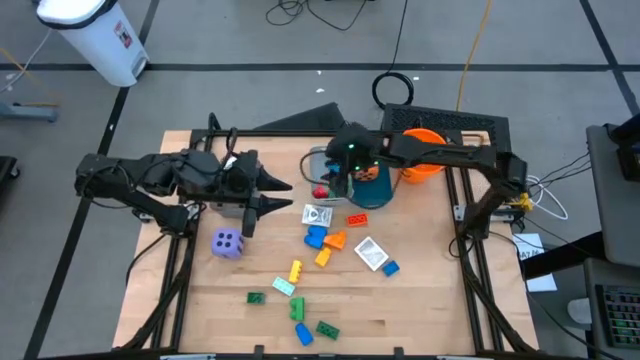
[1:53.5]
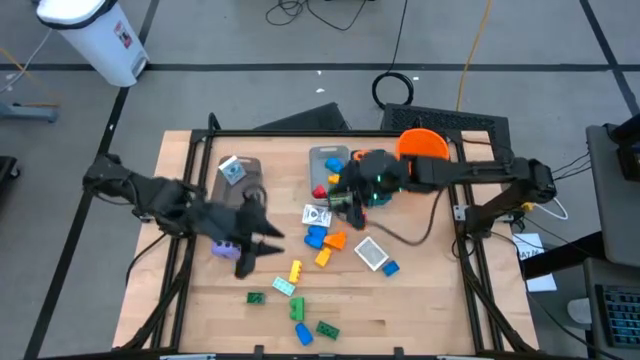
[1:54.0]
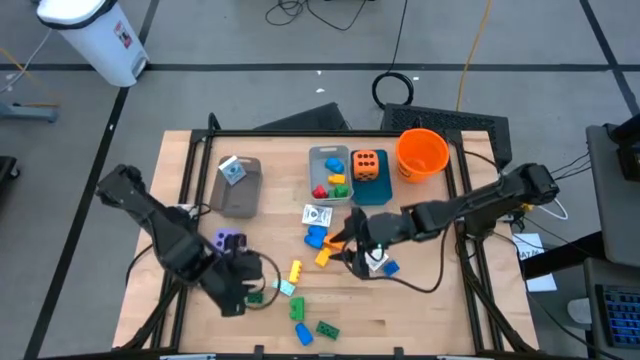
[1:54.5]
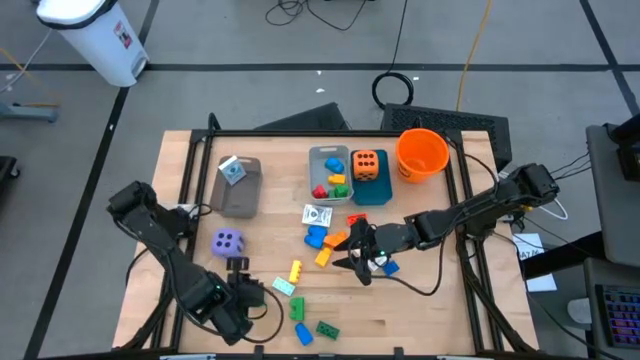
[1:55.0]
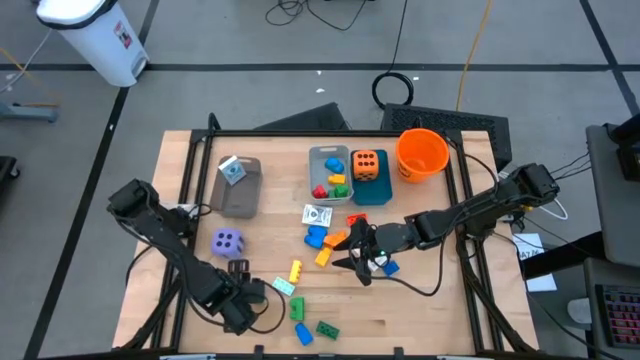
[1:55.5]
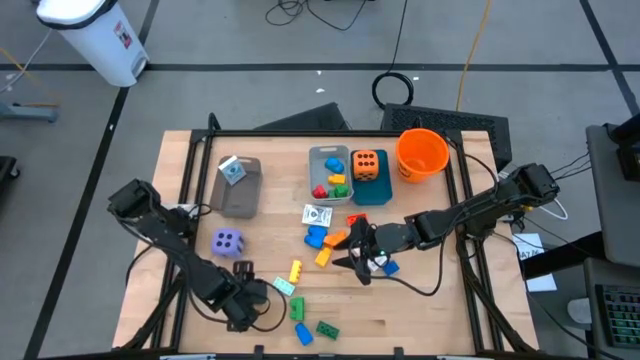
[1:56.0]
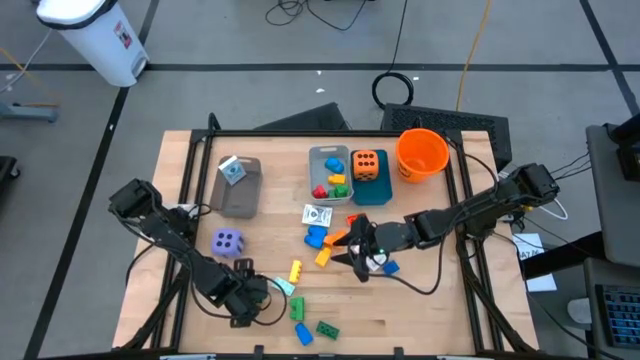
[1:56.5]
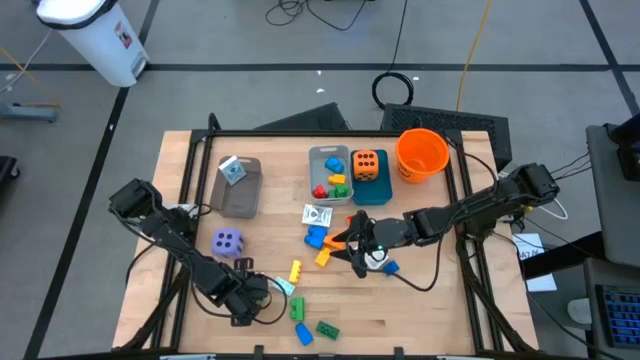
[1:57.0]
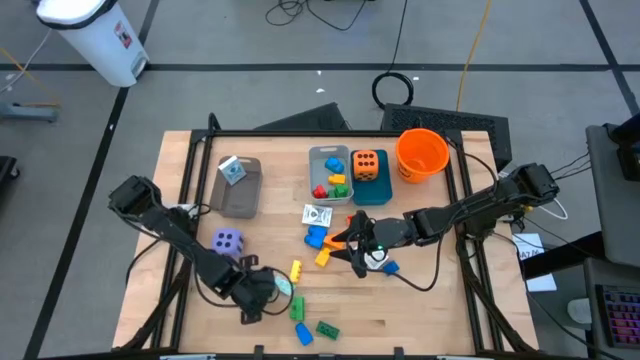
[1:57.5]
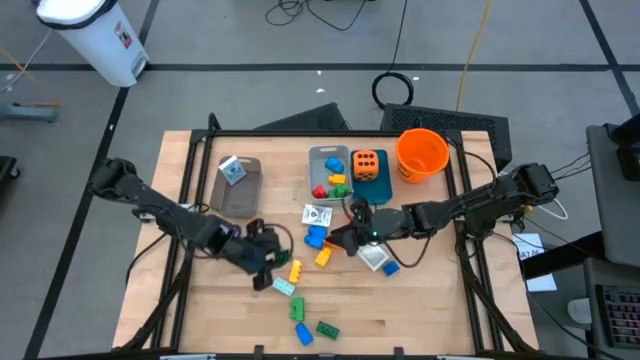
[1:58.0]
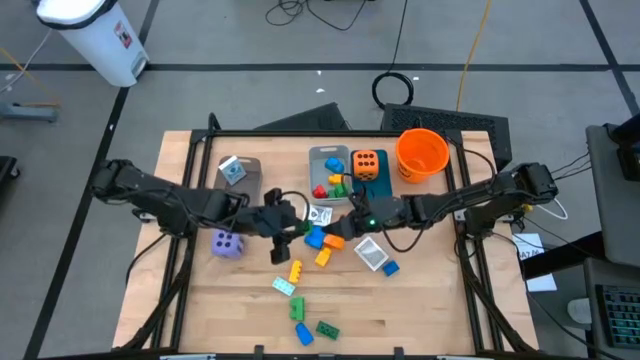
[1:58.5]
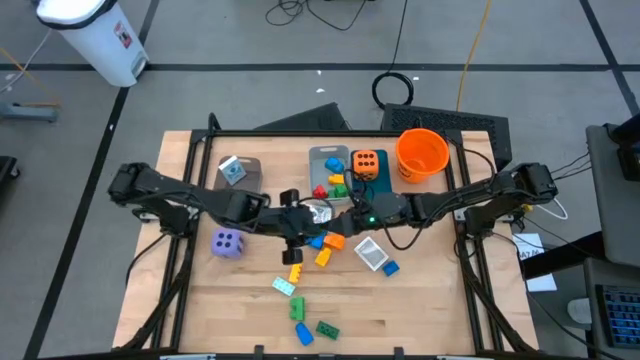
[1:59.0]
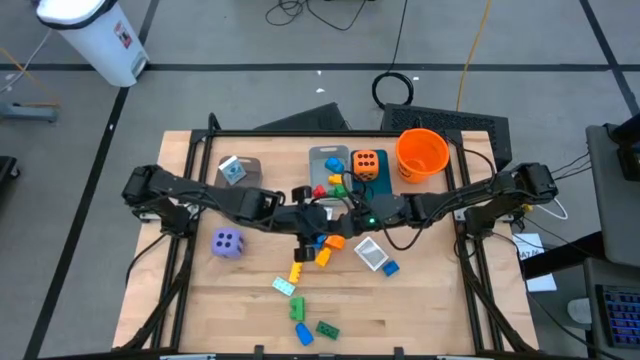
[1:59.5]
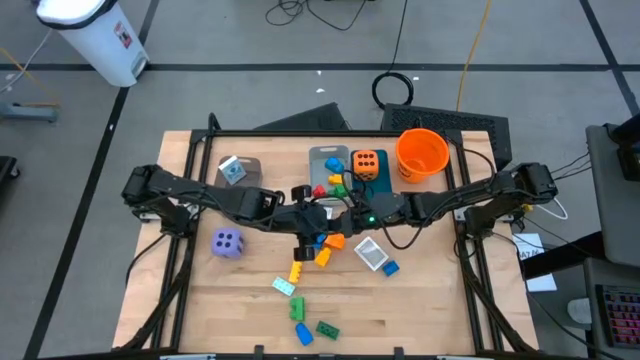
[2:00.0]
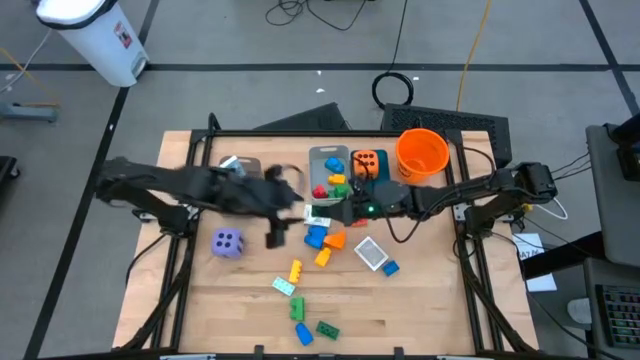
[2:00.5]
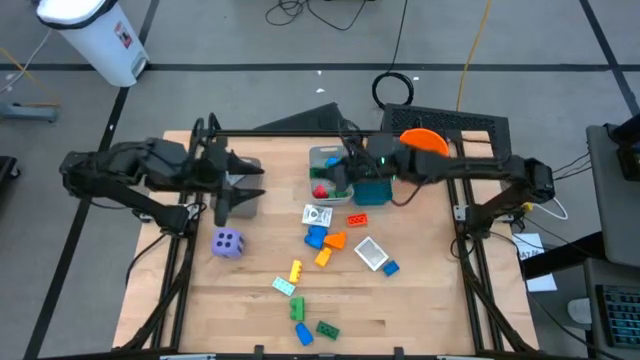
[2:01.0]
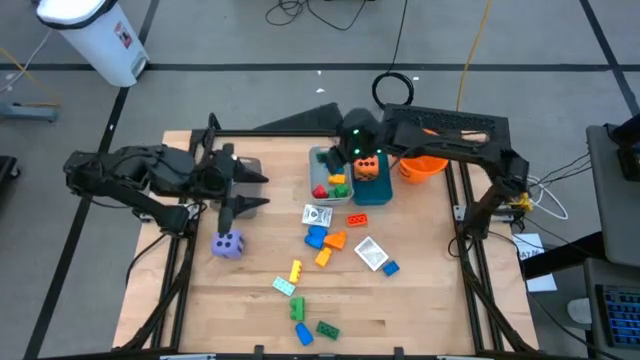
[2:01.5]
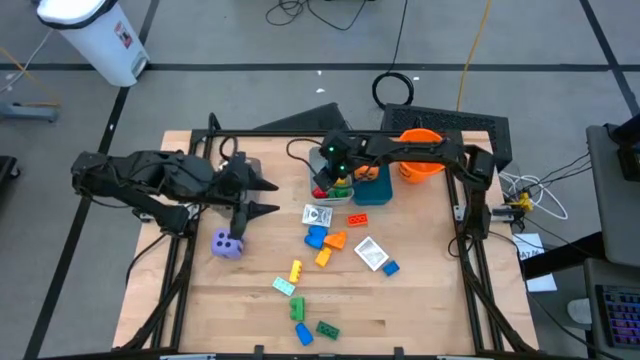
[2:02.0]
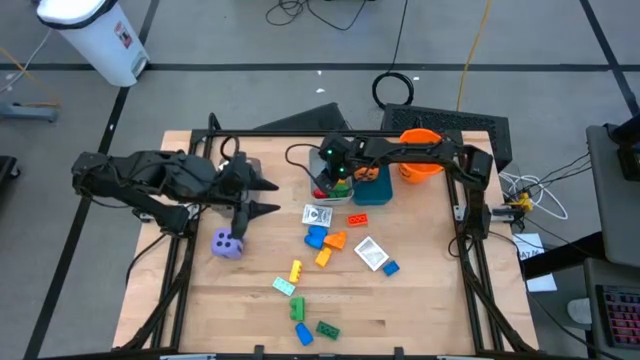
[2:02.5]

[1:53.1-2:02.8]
Task: Pick & Place Toys
Put the green game piece into the gray bin

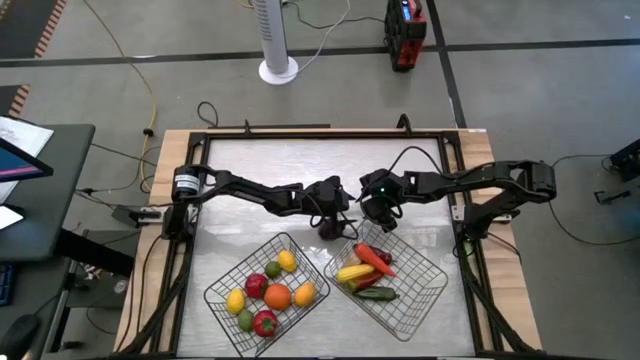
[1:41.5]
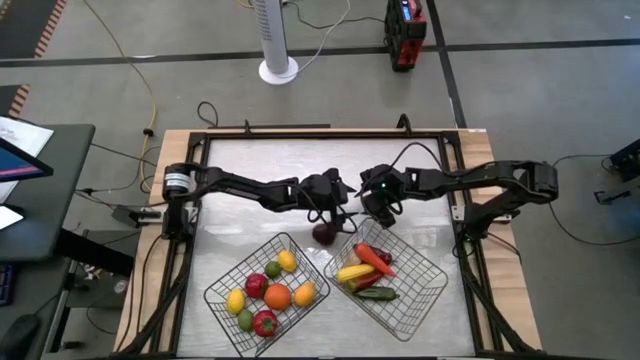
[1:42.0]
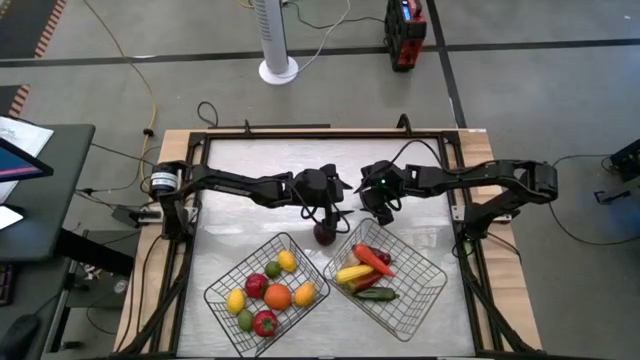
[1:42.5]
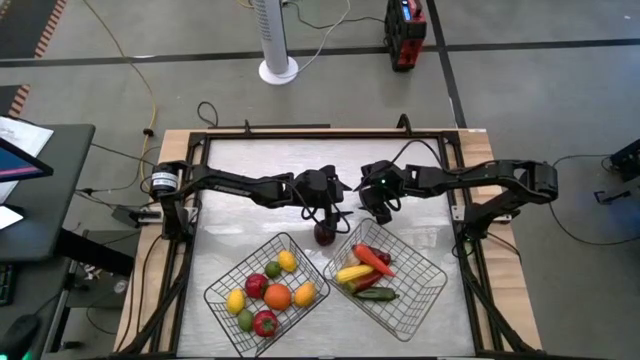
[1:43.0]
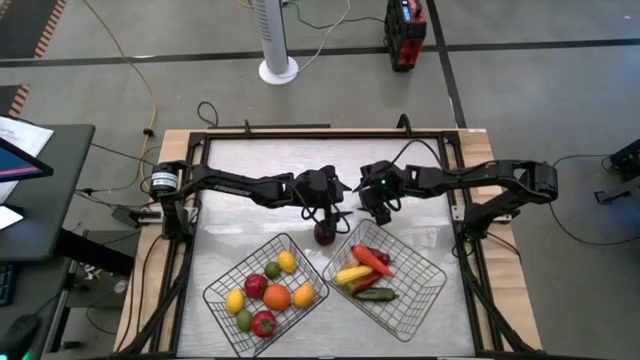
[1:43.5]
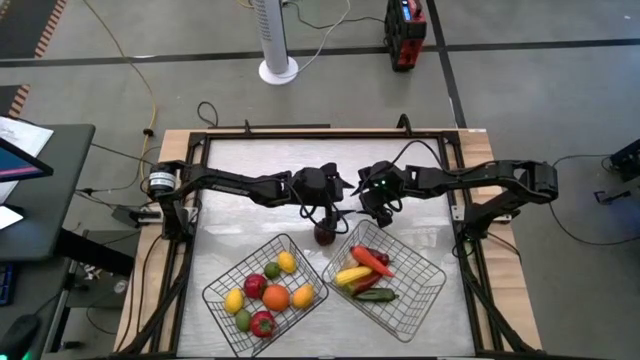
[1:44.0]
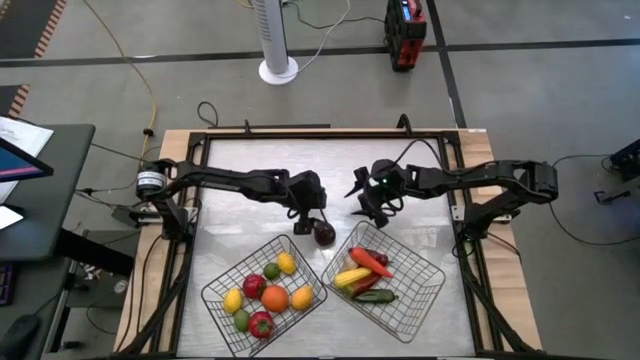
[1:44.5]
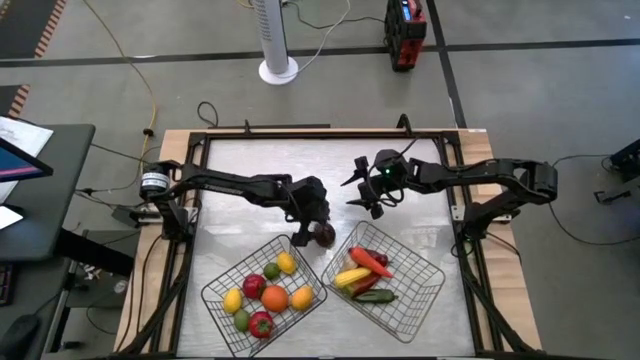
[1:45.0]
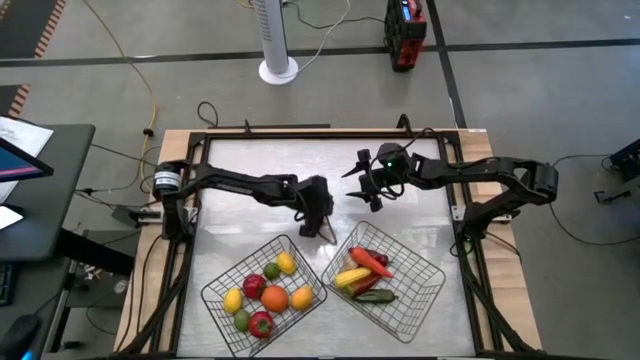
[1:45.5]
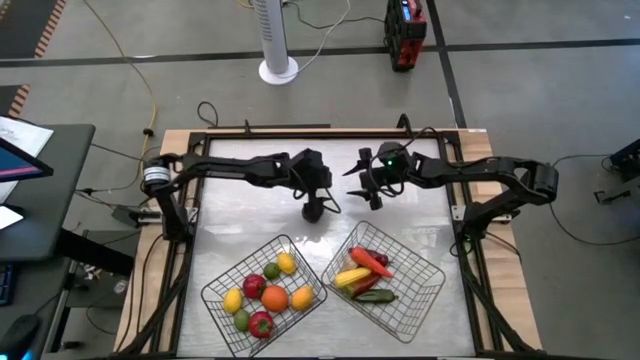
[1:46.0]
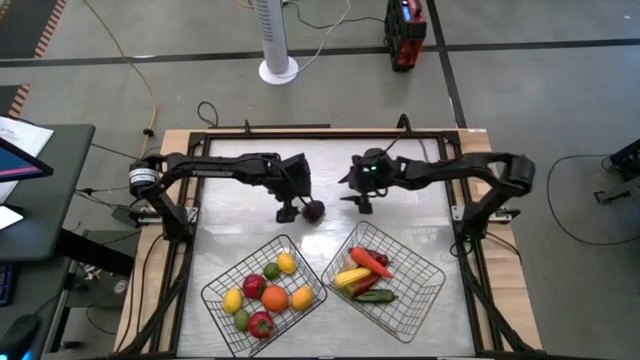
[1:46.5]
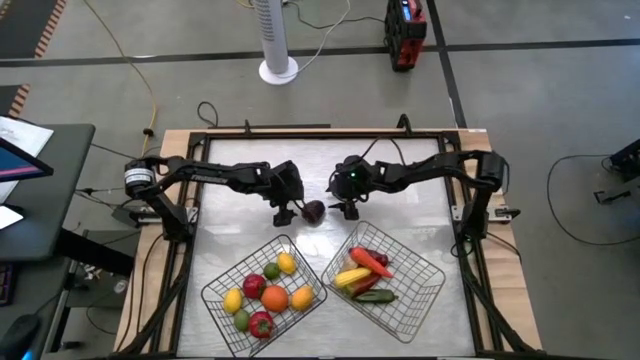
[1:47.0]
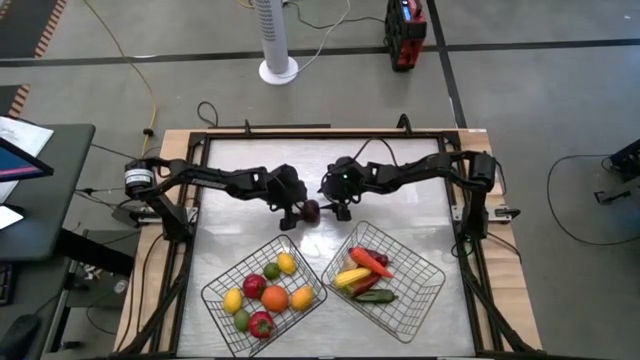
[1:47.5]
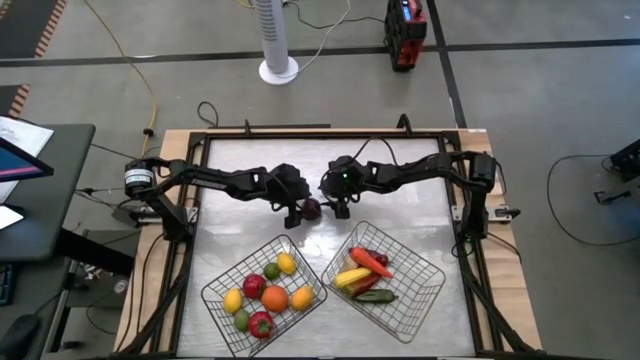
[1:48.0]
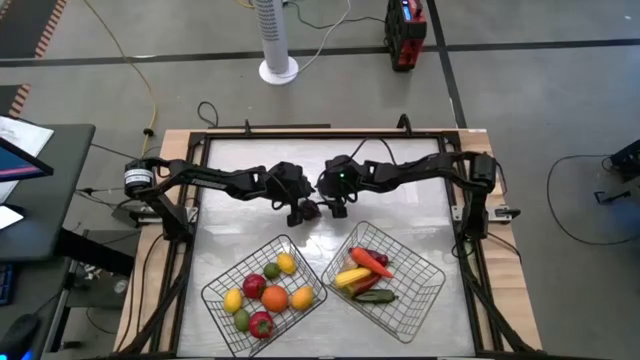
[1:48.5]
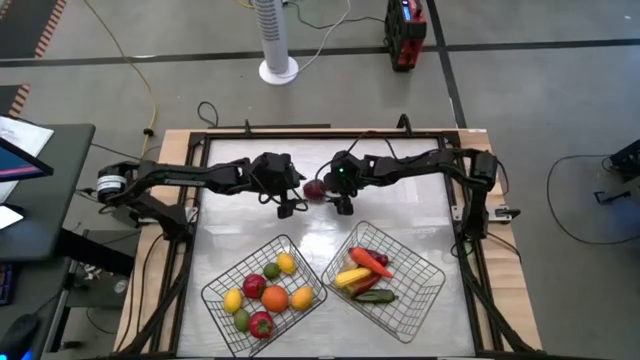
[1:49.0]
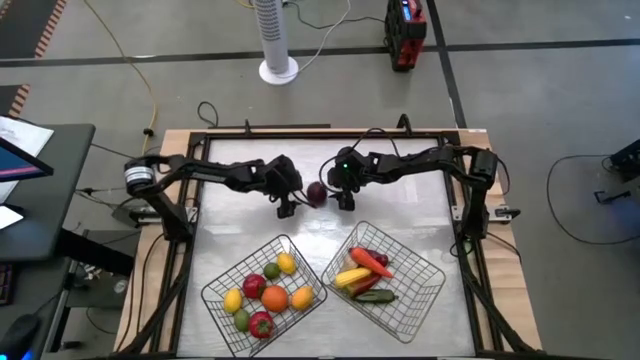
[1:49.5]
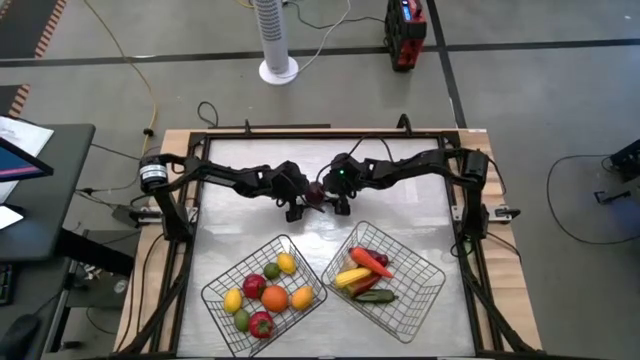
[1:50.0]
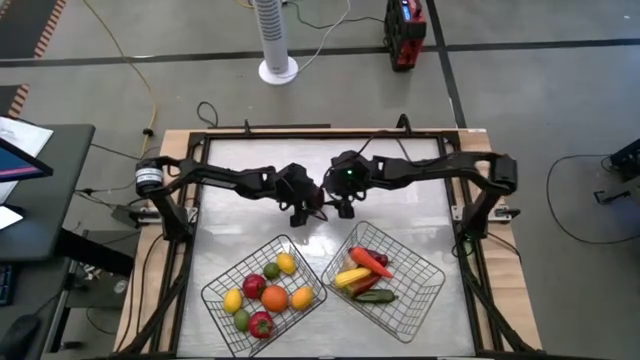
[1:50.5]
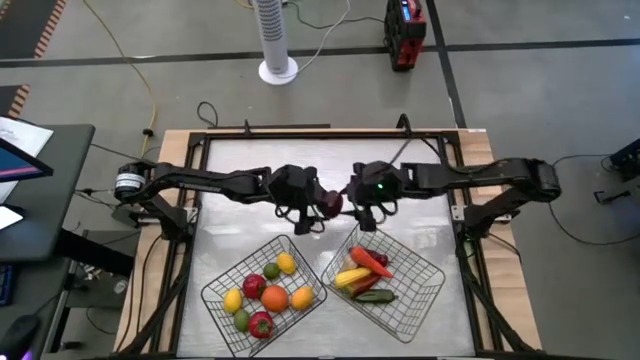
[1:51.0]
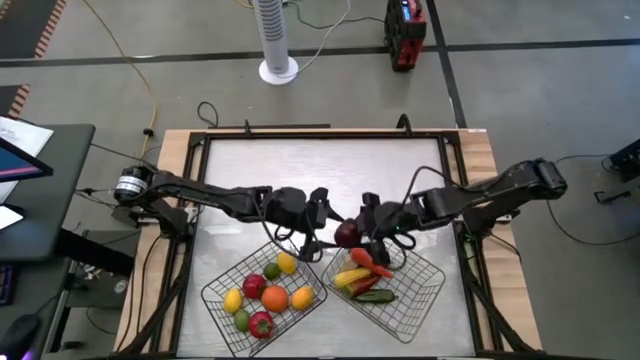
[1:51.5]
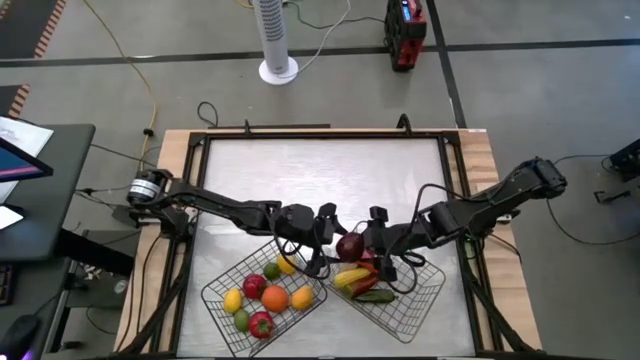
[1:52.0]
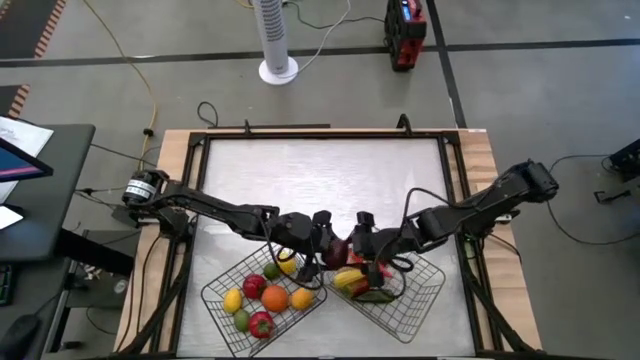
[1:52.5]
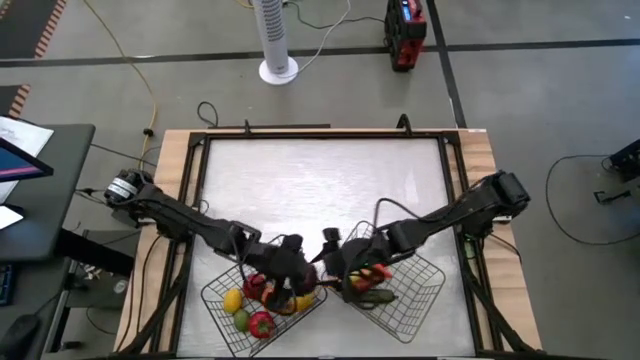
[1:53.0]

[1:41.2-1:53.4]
Task: Sort produce into baskets
Put the red apple into the black basket
